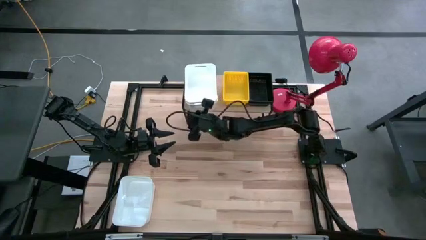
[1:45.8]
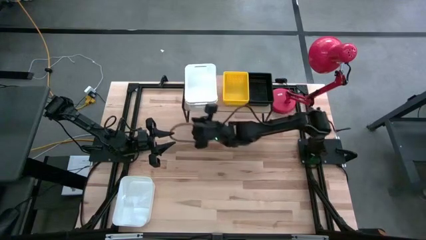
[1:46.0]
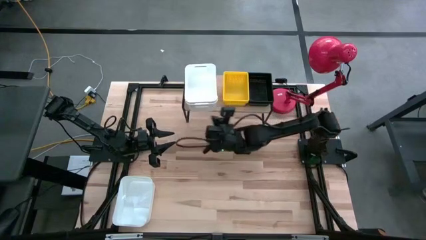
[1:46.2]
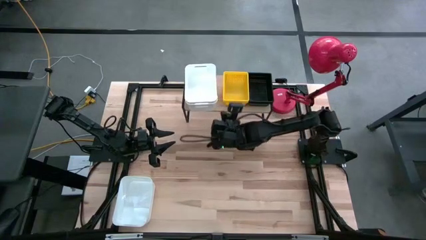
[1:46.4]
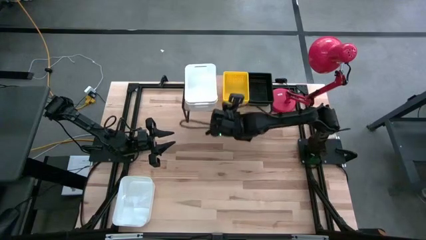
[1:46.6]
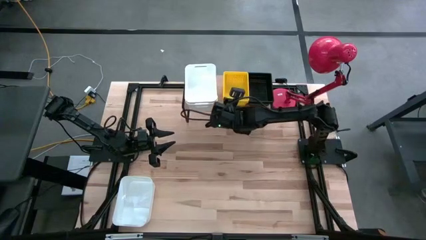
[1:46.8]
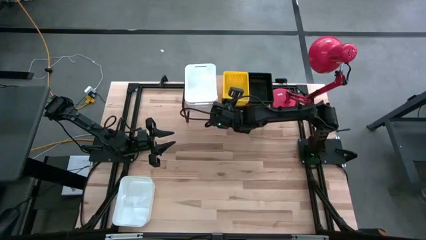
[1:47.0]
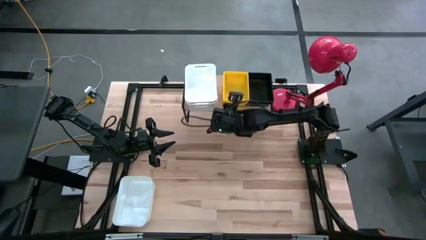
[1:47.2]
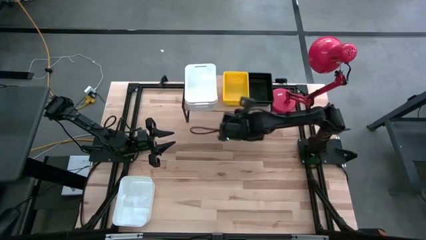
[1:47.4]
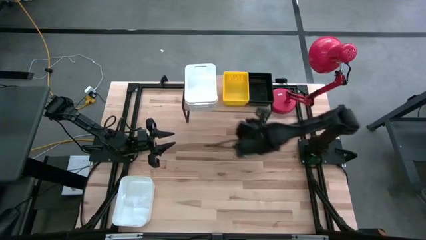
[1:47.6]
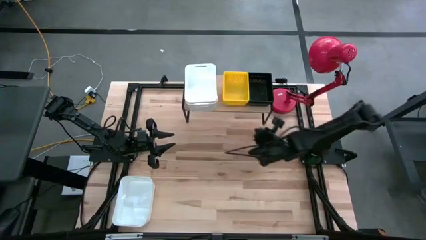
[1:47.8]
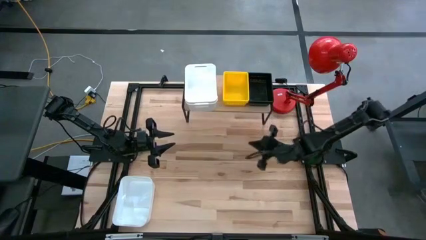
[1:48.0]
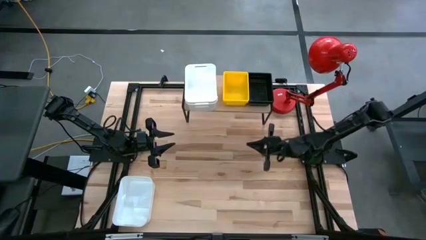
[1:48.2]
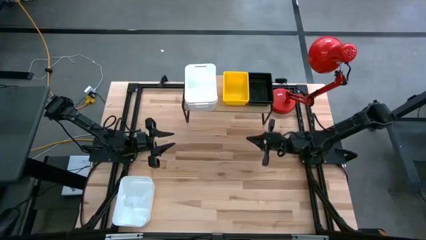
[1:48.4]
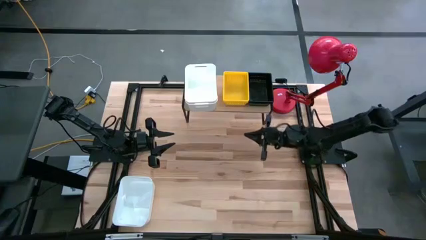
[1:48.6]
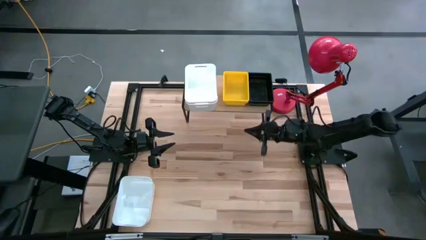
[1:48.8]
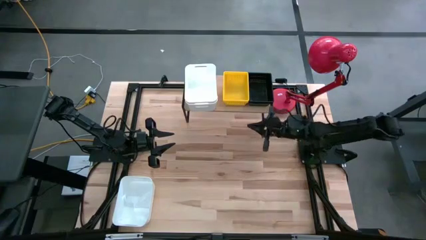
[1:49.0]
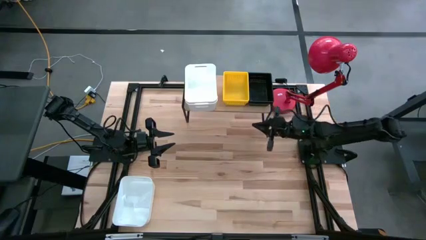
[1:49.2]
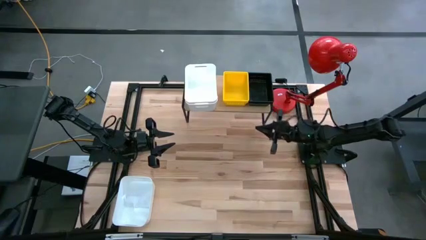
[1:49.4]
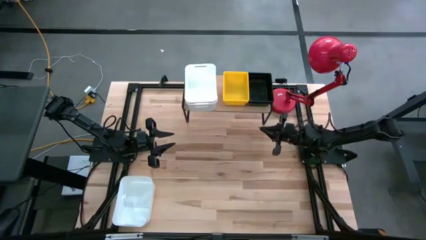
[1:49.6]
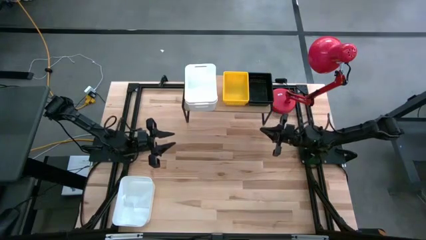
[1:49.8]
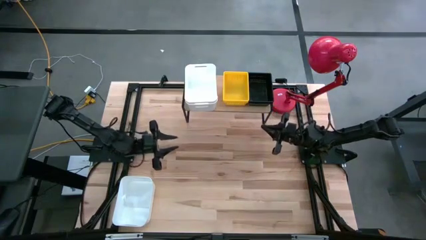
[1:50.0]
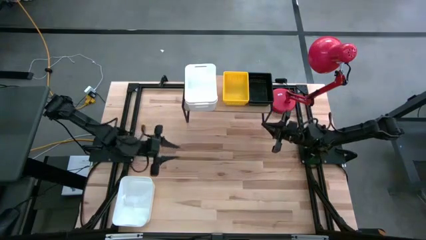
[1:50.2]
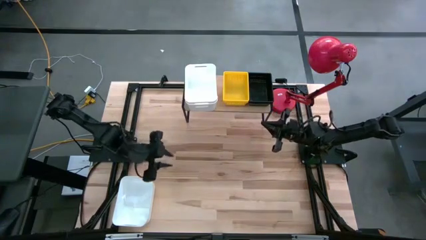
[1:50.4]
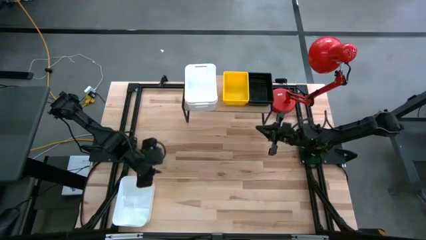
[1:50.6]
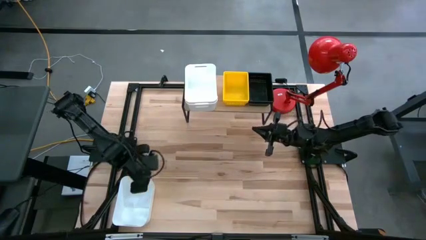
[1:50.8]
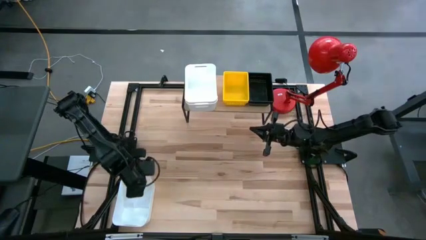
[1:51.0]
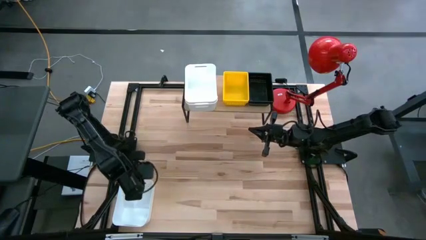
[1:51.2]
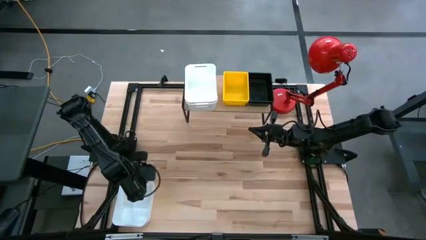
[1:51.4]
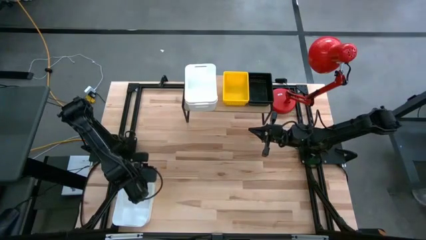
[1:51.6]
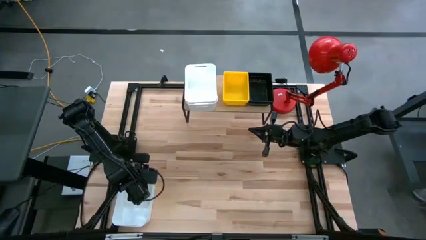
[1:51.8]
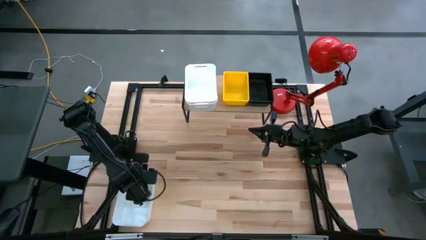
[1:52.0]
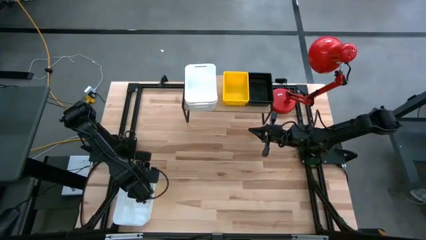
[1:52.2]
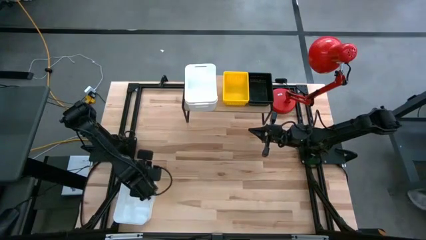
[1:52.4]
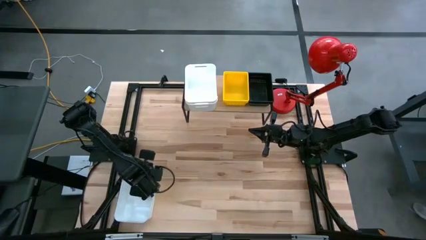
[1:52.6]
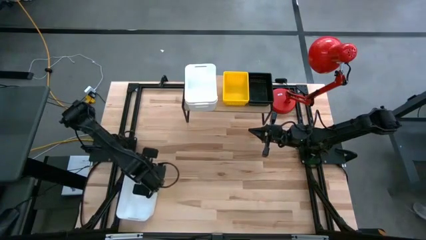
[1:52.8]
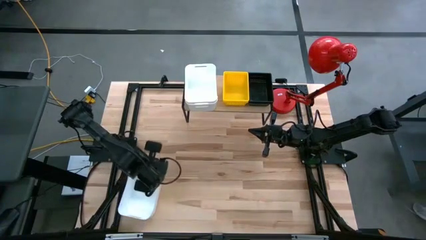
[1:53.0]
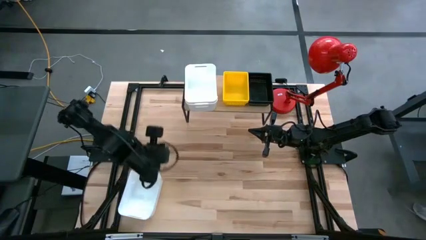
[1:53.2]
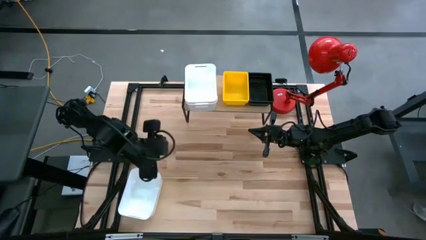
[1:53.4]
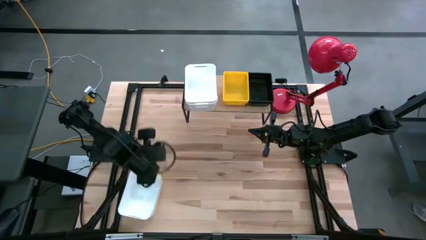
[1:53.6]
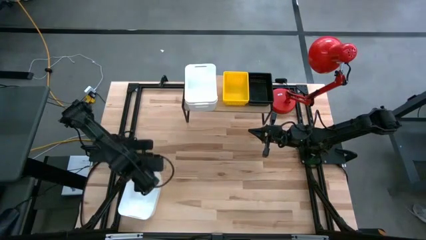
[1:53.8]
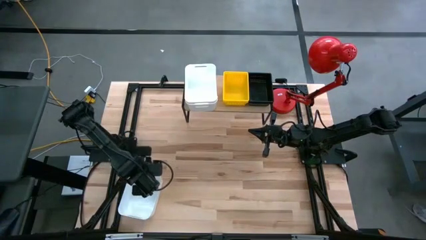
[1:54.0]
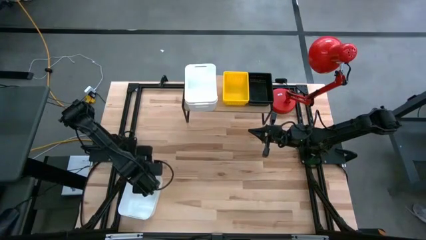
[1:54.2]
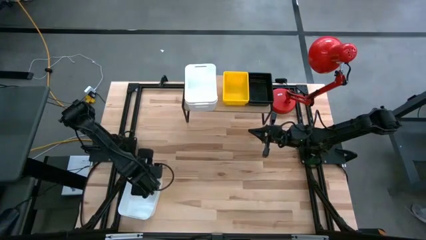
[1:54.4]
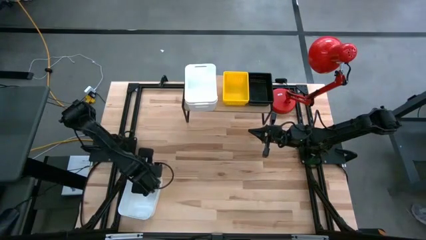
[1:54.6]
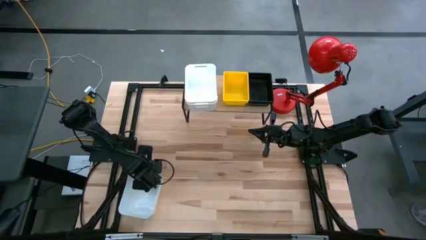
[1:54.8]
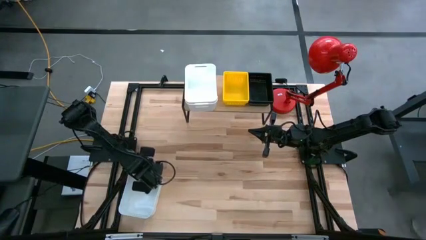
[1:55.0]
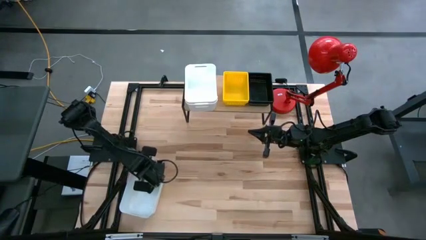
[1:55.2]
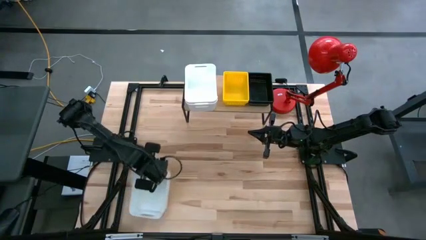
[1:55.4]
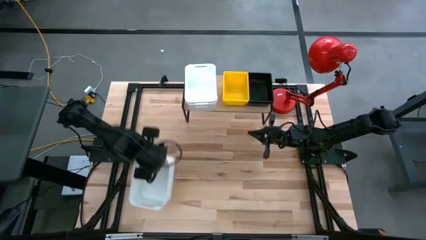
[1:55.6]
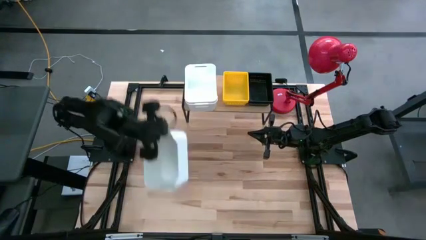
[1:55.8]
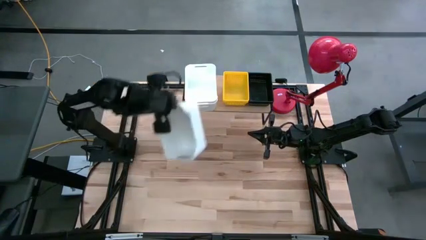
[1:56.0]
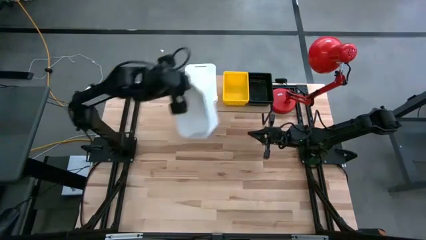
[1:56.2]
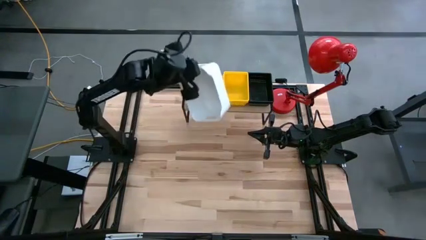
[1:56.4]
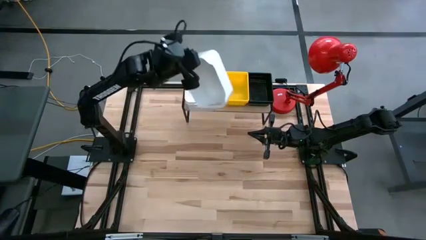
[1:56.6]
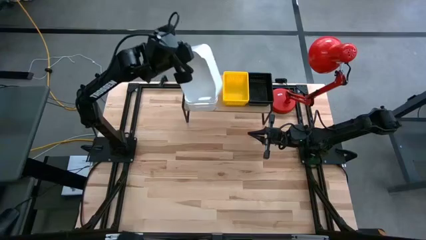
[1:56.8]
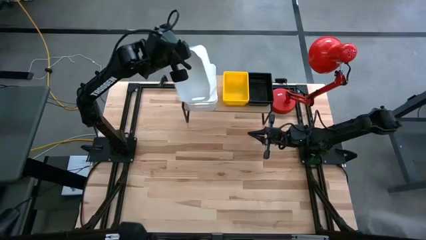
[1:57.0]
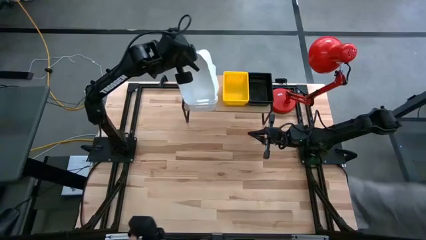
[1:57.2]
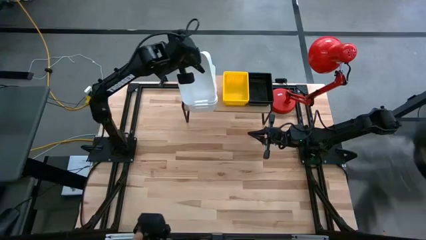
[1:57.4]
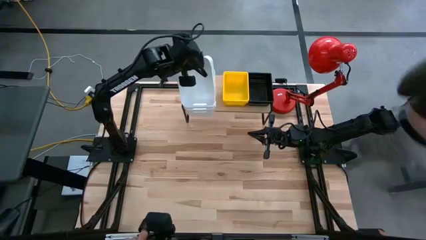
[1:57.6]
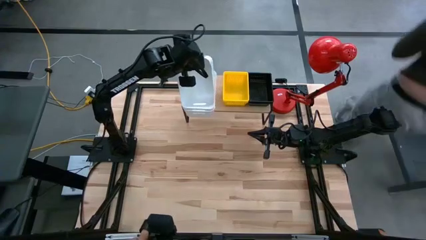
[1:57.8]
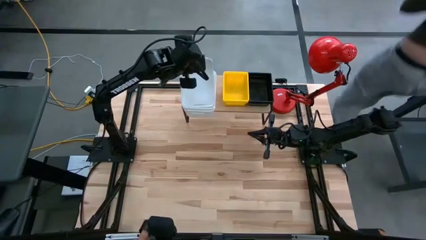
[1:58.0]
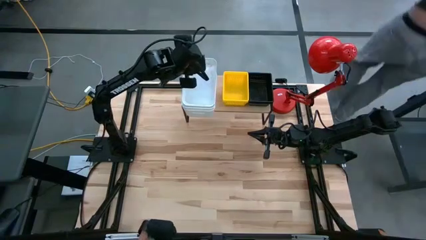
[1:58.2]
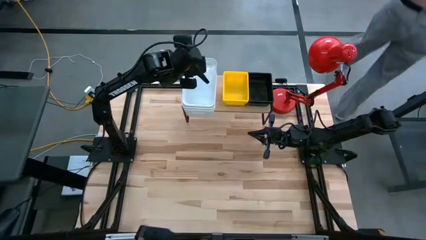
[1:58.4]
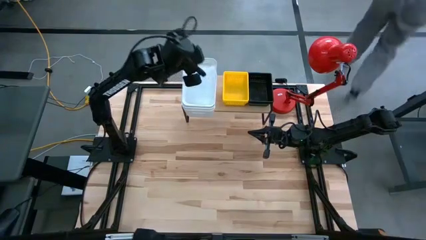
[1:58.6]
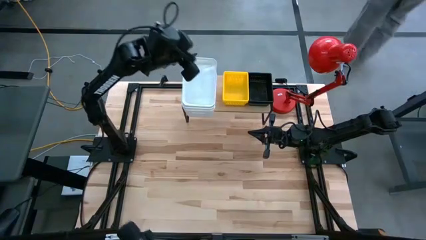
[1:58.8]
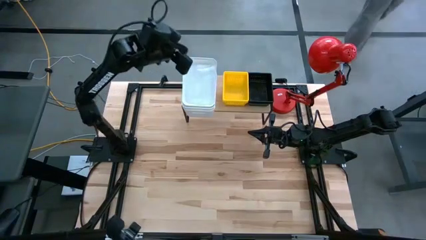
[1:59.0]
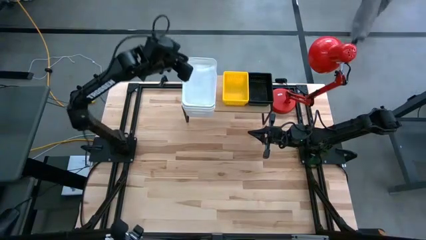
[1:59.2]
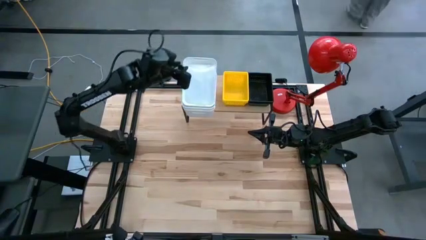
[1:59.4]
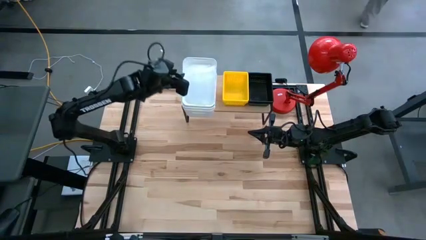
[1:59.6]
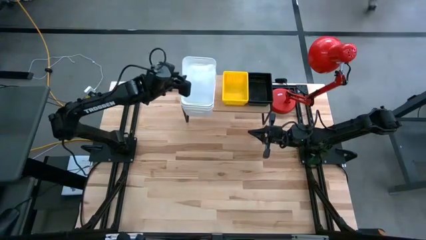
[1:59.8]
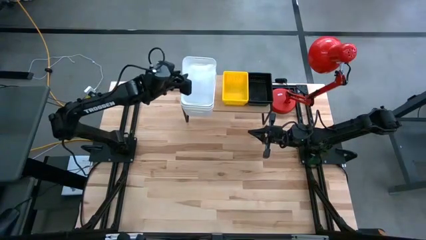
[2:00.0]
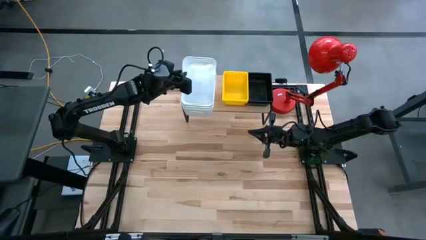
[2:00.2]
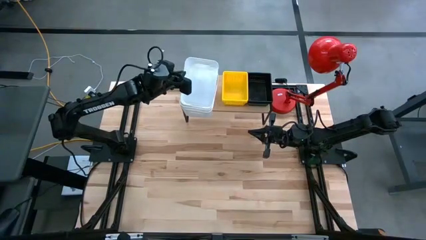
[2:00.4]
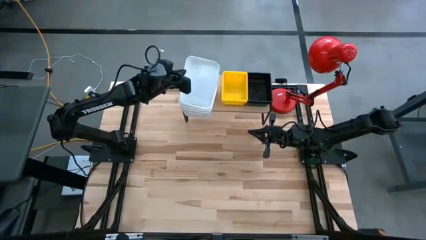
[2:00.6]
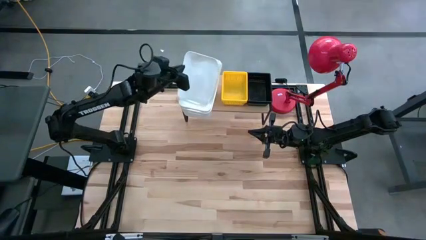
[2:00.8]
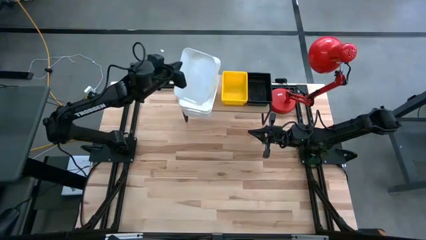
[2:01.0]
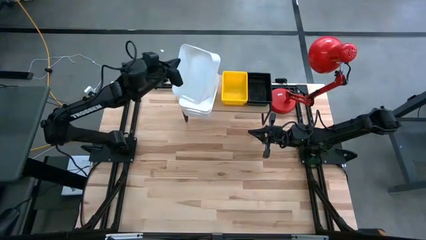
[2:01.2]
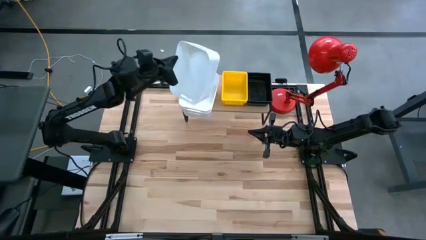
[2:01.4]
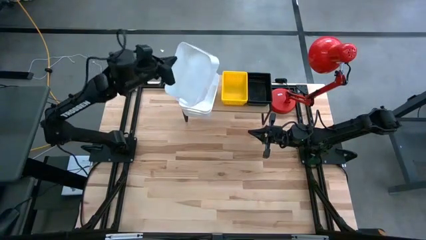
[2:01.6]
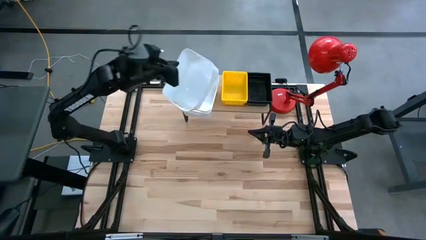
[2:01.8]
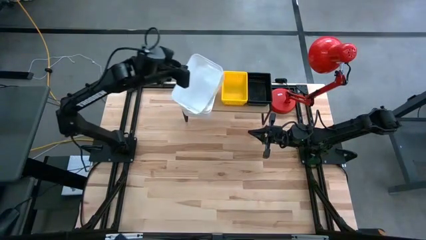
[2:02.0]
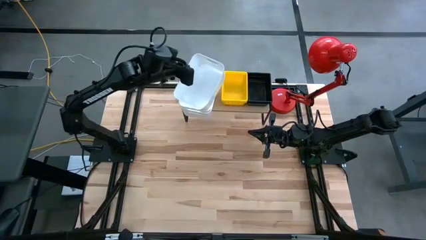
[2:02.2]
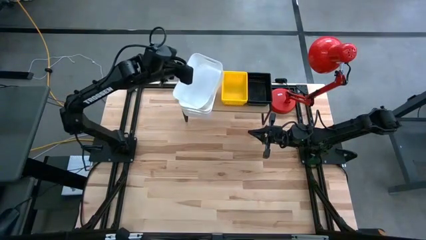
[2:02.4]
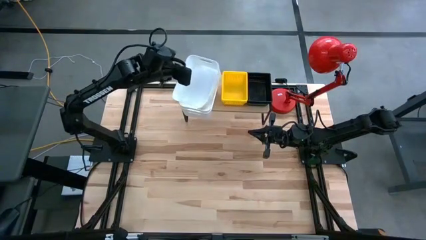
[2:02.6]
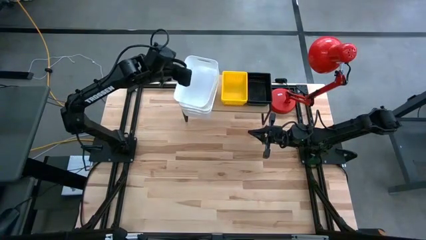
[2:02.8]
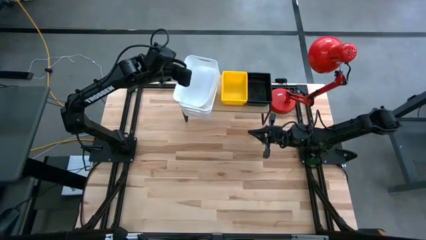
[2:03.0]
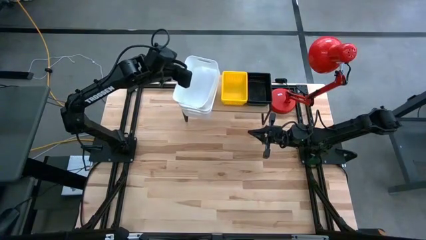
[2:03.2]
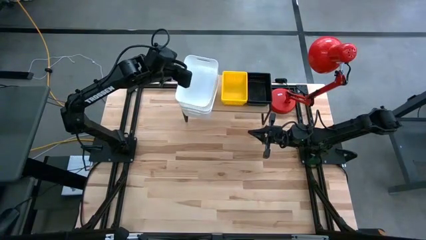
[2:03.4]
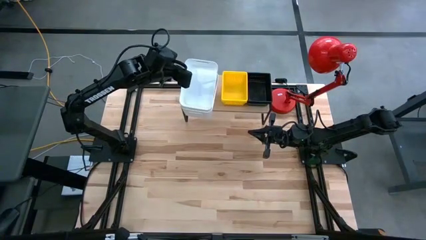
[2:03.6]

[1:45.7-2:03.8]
Task: Stack baskets on shelf by color
Stack the white bin into the other white bin on the shelf
